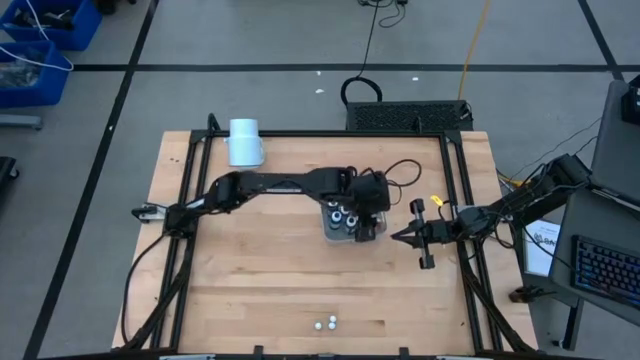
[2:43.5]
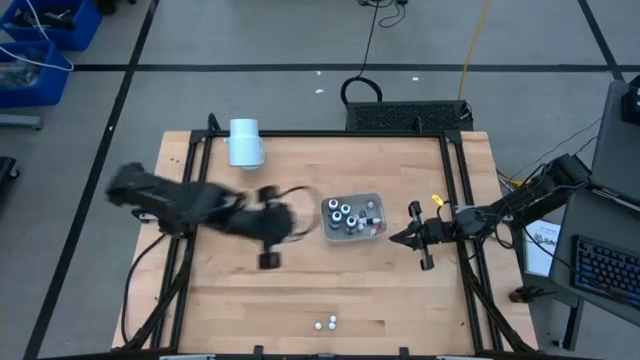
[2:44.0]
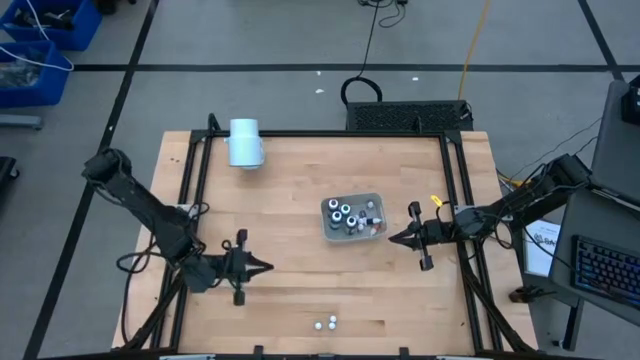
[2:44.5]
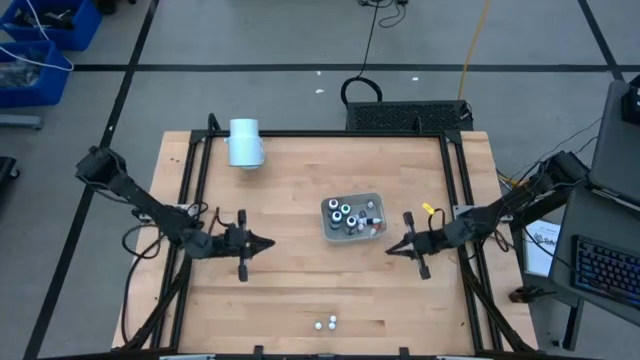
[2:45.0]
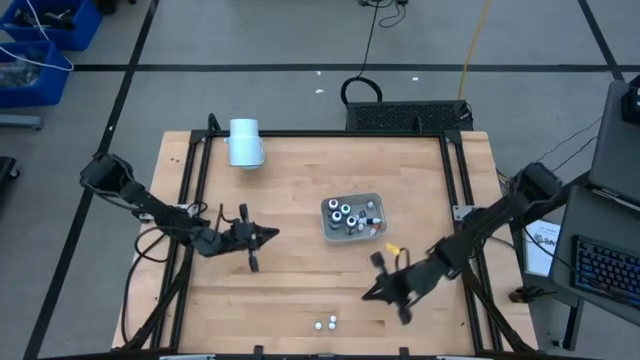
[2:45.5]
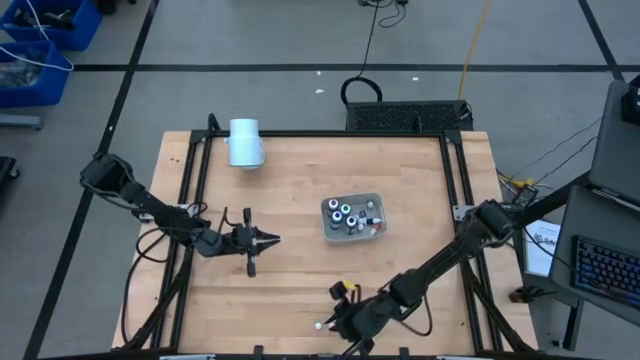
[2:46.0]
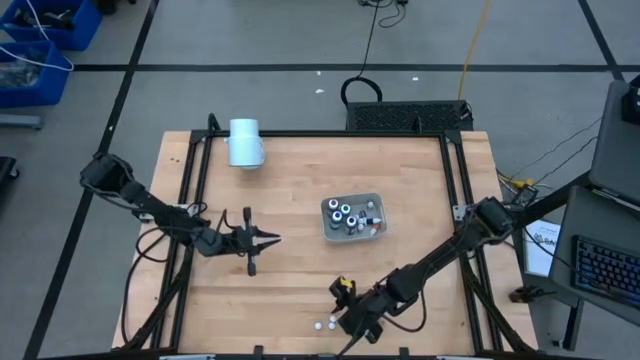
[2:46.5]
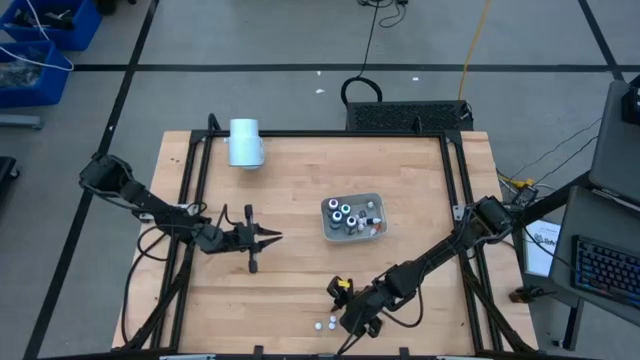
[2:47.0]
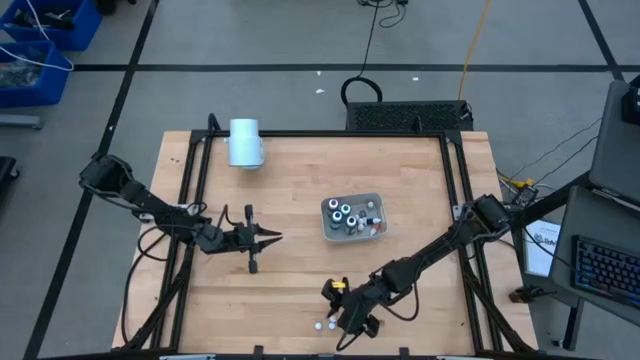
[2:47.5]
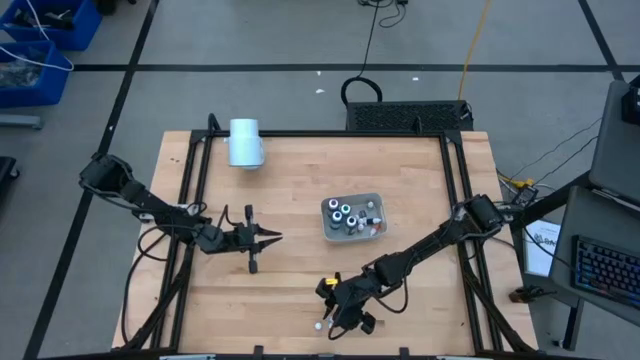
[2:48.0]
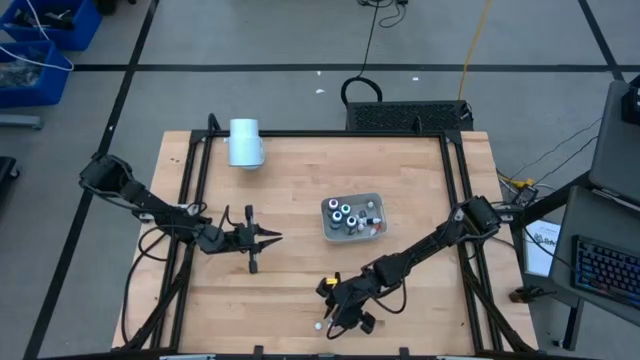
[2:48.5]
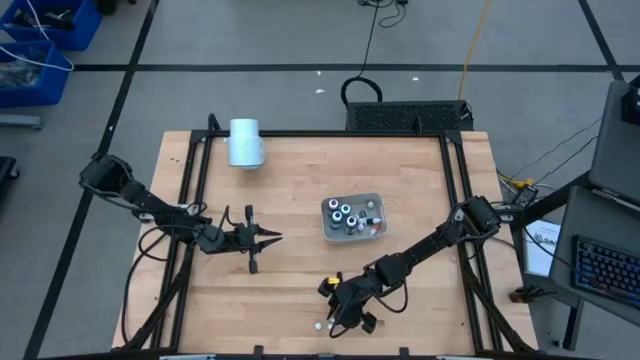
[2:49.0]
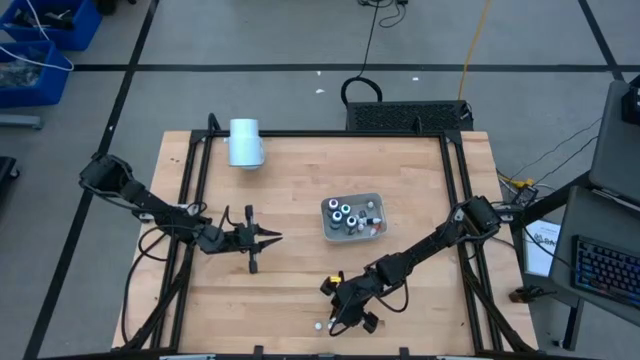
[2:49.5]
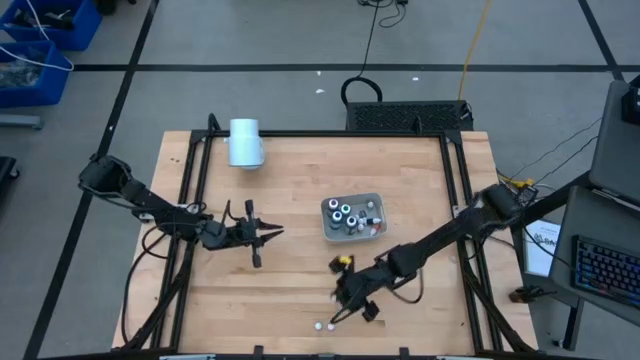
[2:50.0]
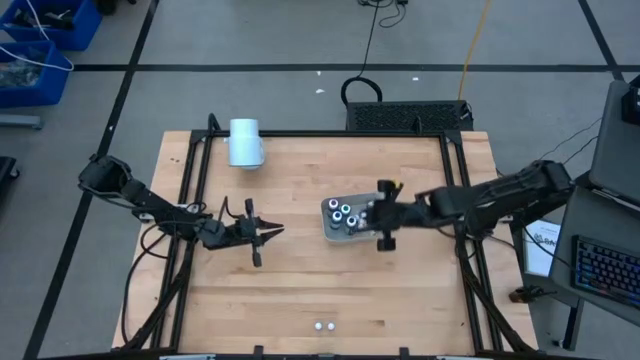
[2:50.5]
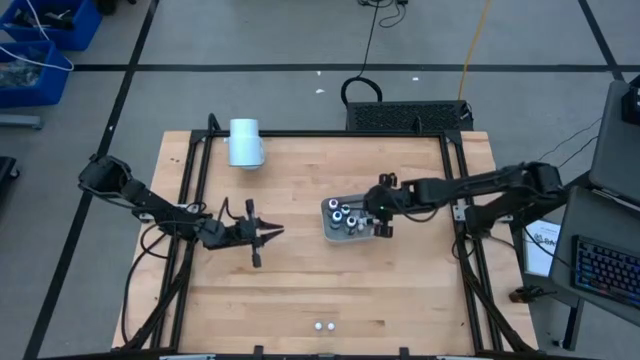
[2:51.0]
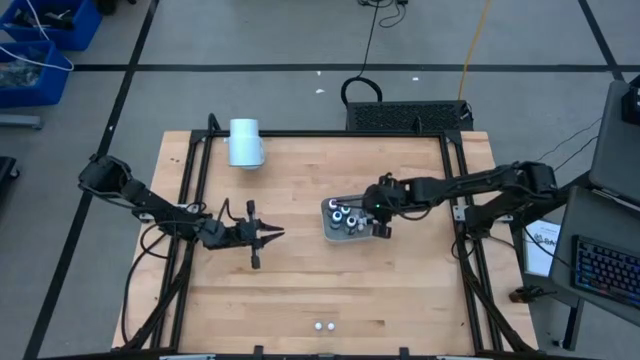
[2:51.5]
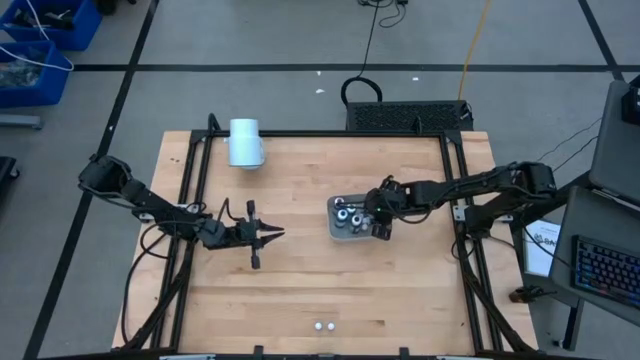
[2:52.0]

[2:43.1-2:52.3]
Task: Pick & Place food coloring
Put the small blue food coloring bottle into the gray bin

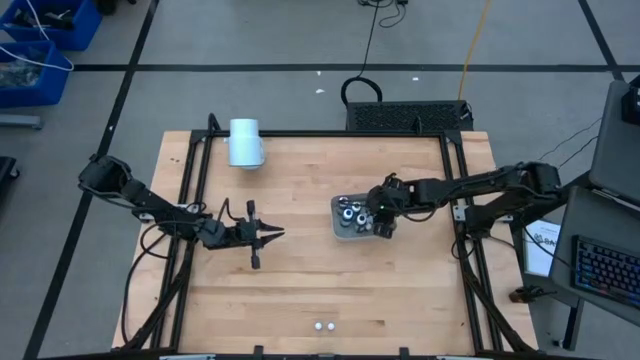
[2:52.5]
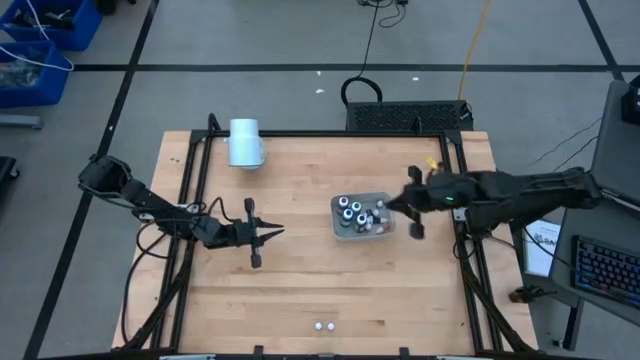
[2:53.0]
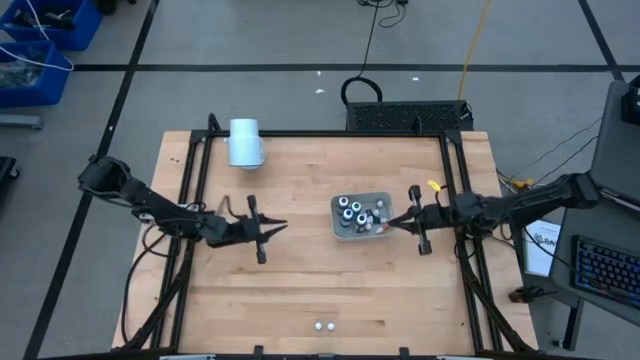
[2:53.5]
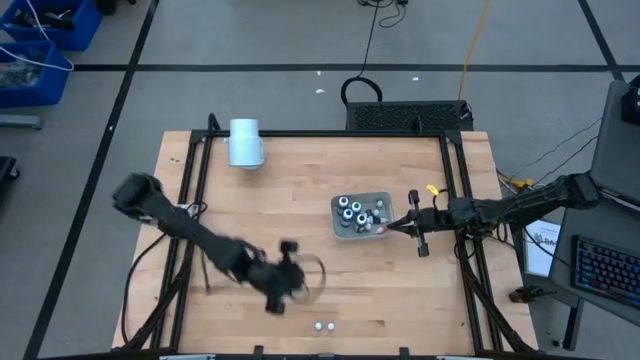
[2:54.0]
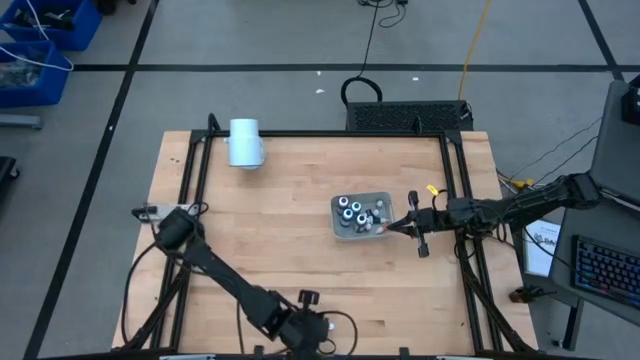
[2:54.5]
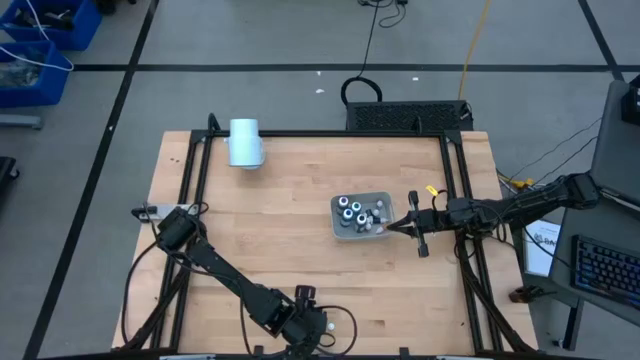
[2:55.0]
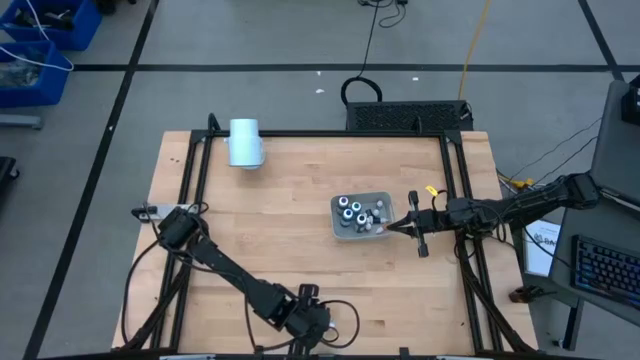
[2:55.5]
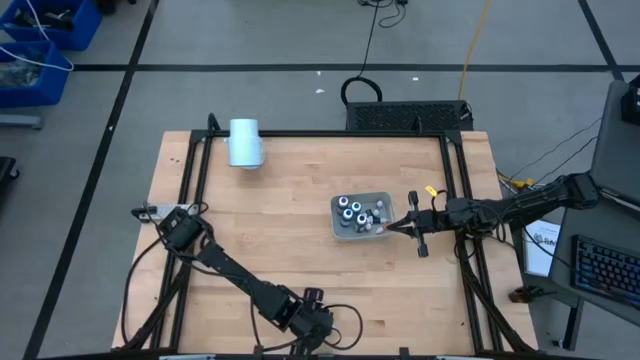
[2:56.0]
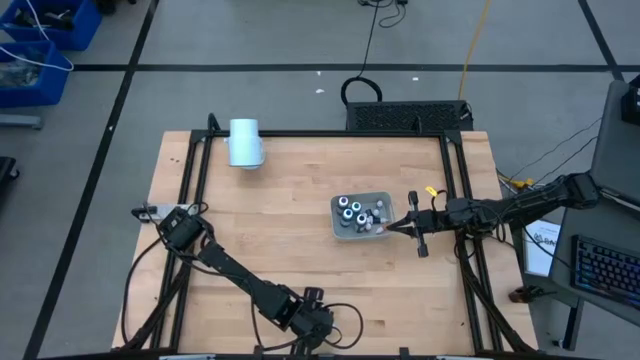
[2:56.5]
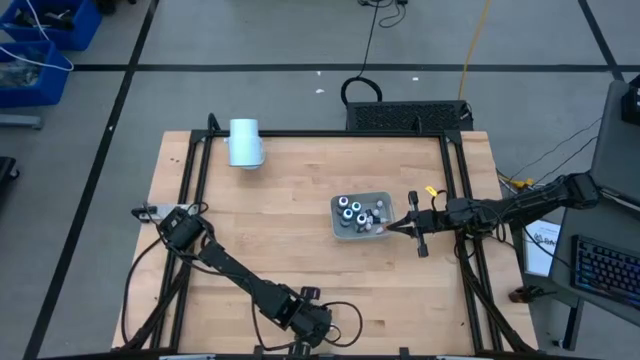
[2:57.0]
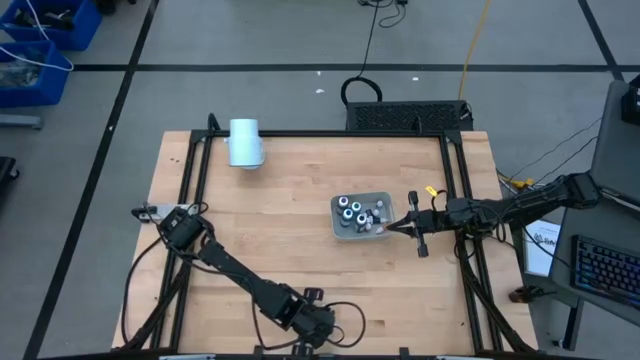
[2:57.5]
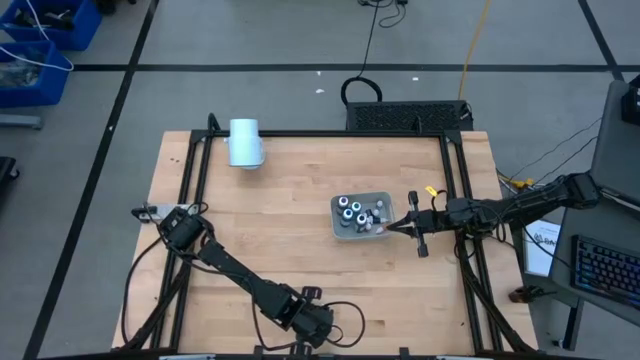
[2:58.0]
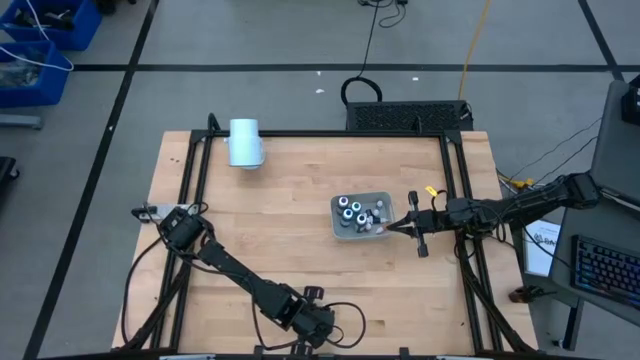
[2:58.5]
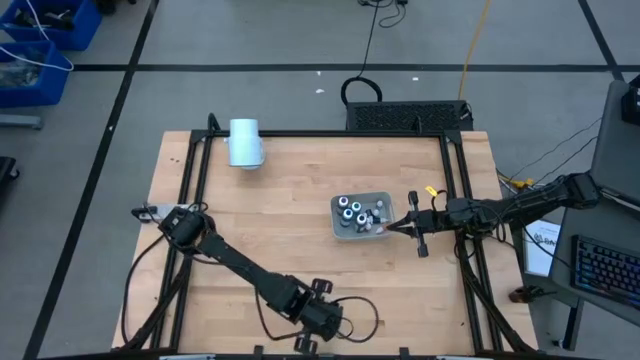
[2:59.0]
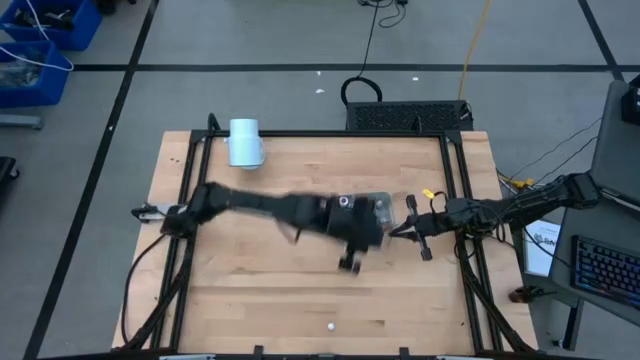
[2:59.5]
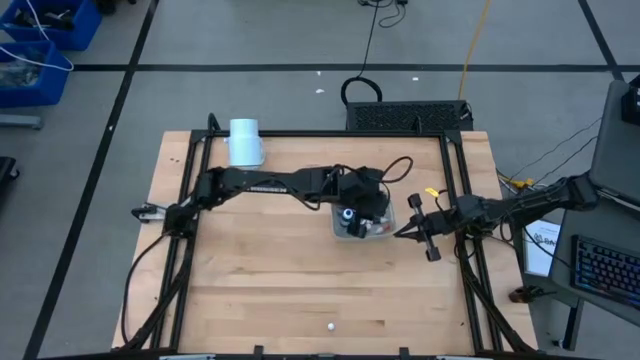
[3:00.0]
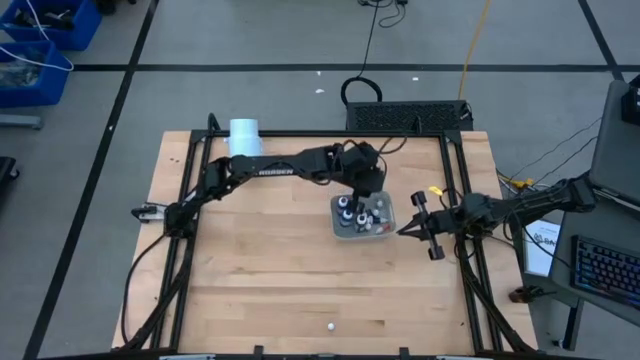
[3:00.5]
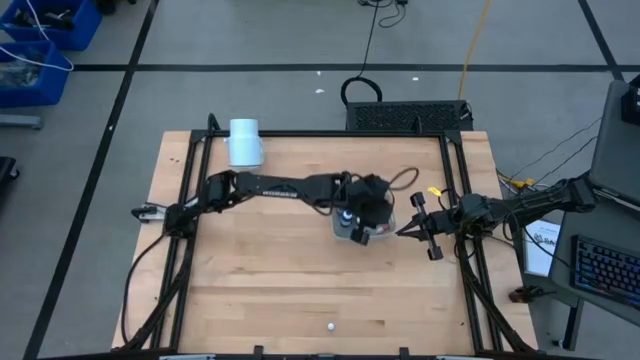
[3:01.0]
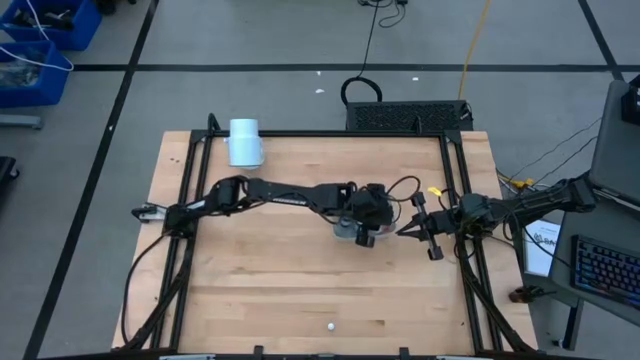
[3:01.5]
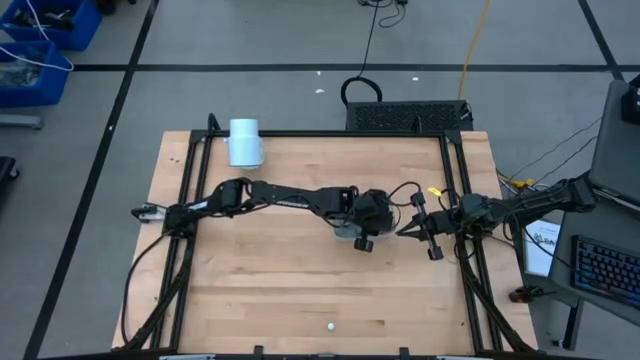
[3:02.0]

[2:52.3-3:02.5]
Put the small red food coloring bottle into the gray bin

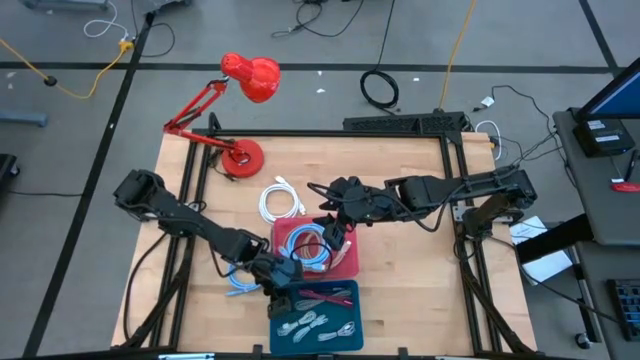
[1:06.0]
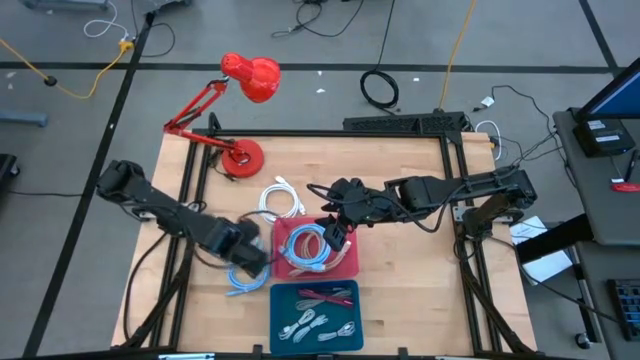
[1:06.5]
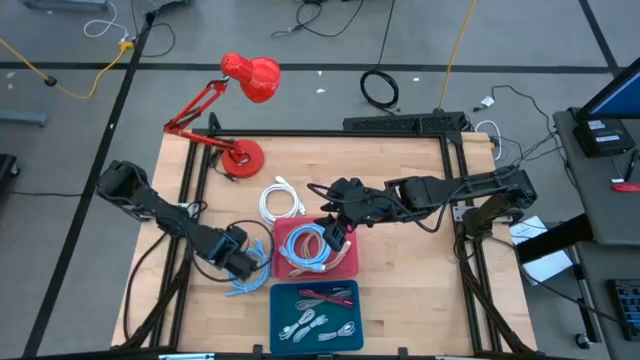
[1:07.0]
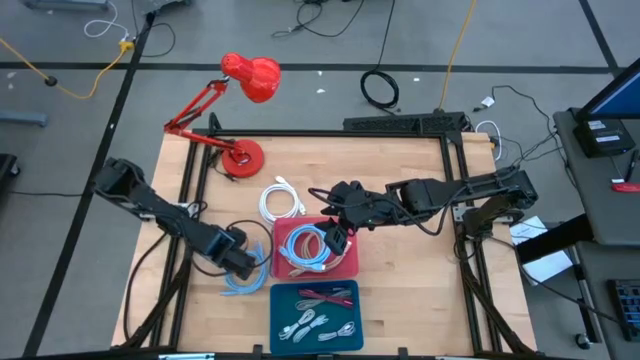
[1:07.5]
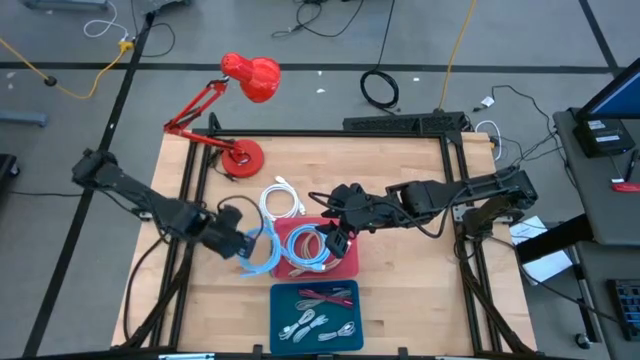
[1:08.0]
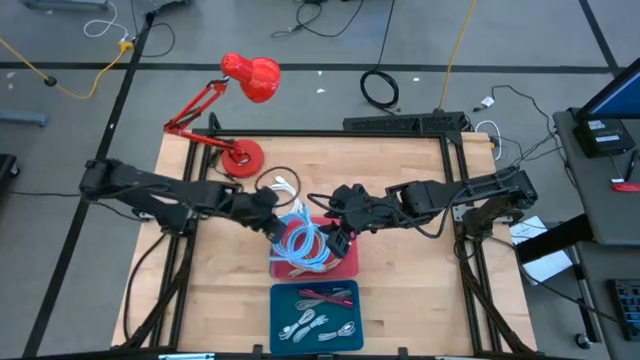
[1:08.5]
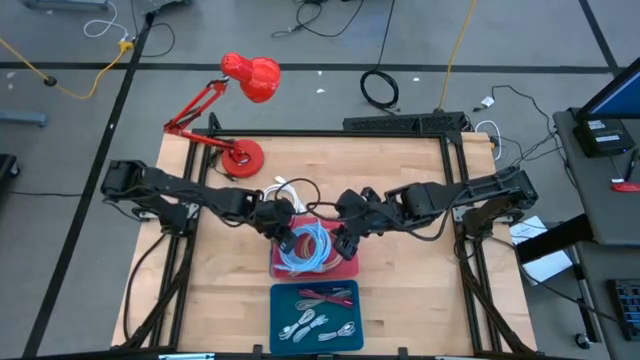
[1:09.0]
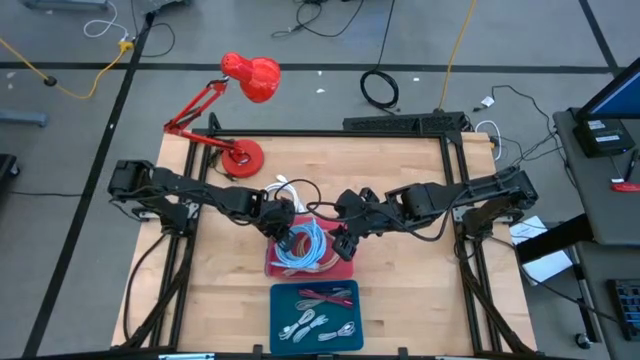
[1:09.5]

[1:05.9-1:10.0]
Task: Pick & Place USB Port
Put the blue HDMI cable into the red bin
